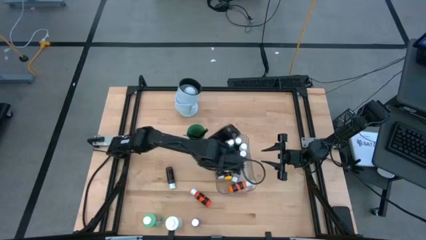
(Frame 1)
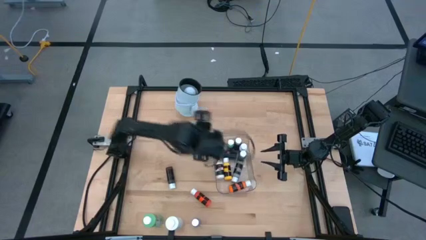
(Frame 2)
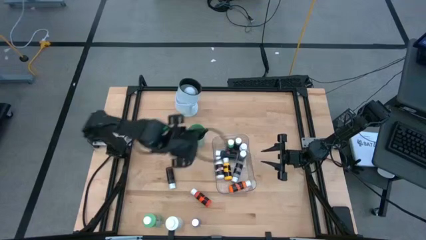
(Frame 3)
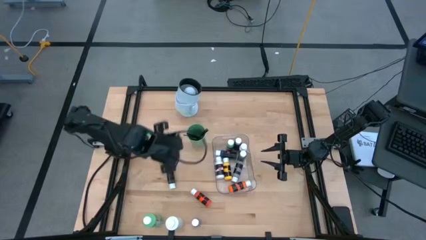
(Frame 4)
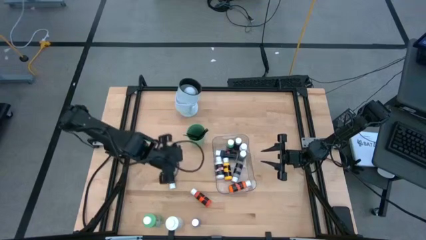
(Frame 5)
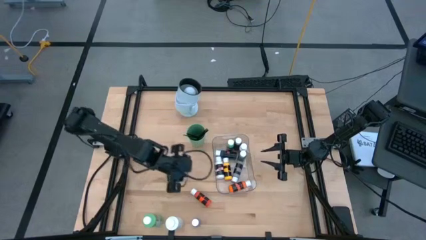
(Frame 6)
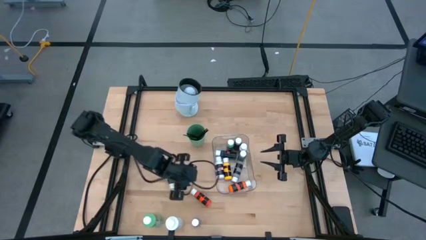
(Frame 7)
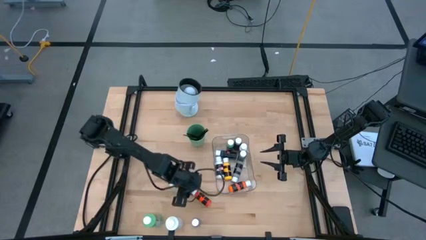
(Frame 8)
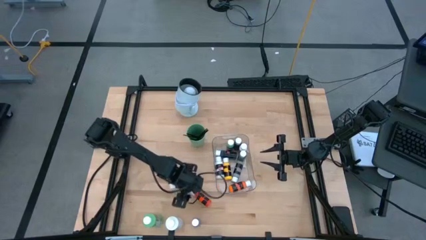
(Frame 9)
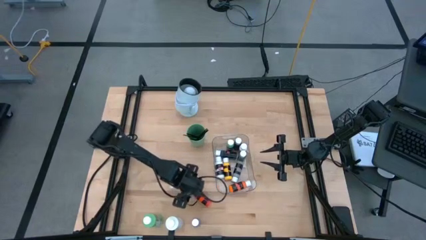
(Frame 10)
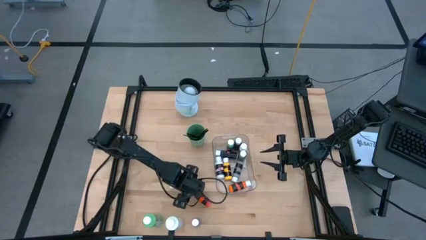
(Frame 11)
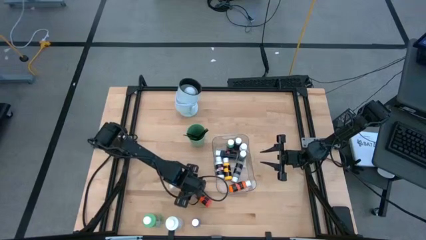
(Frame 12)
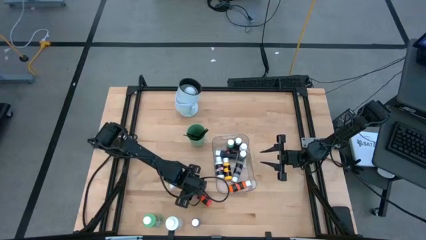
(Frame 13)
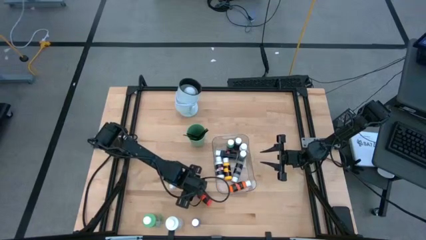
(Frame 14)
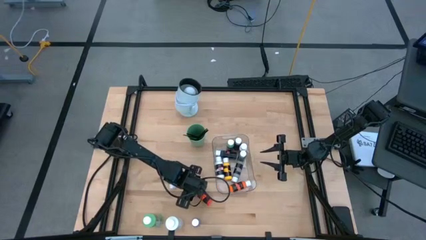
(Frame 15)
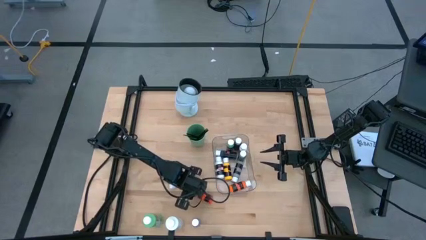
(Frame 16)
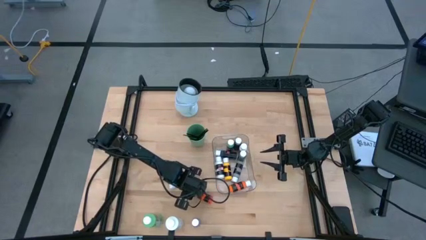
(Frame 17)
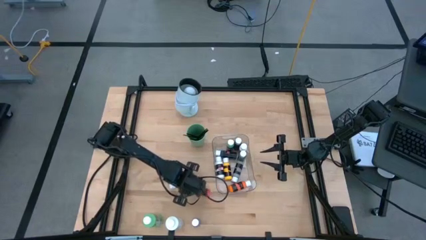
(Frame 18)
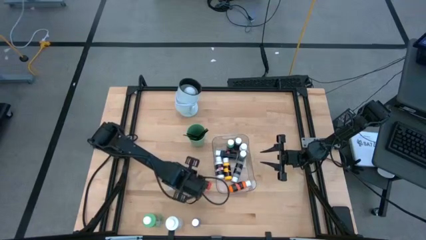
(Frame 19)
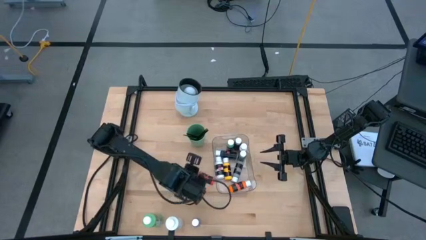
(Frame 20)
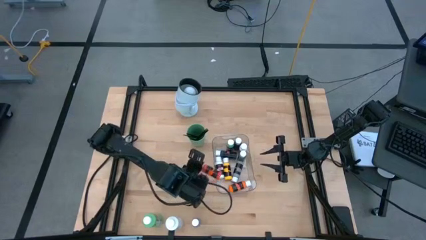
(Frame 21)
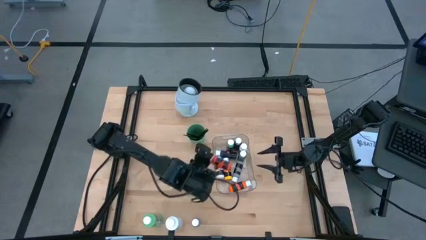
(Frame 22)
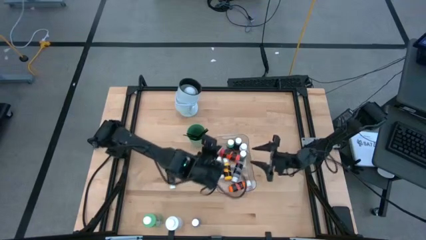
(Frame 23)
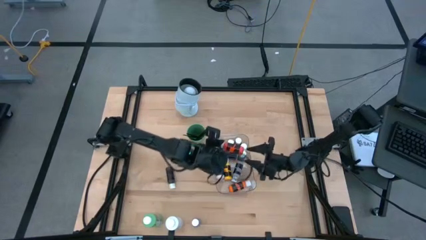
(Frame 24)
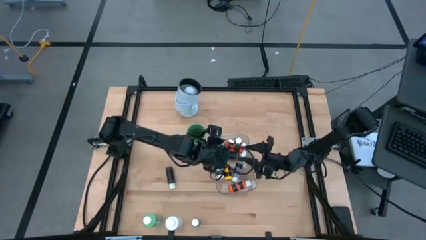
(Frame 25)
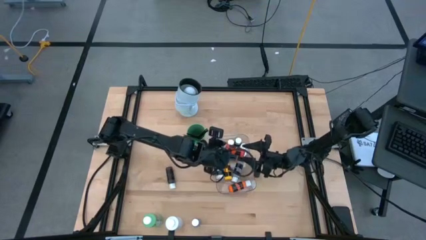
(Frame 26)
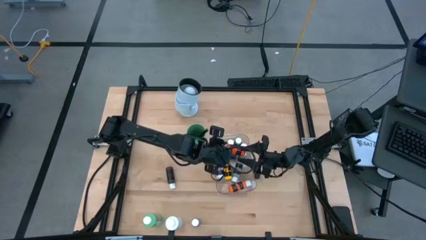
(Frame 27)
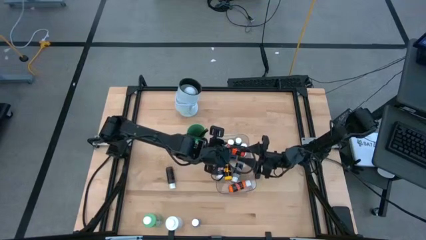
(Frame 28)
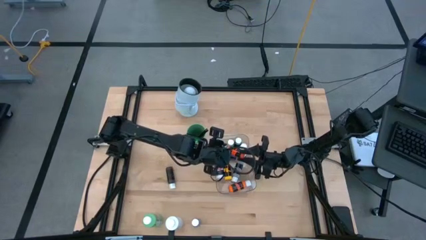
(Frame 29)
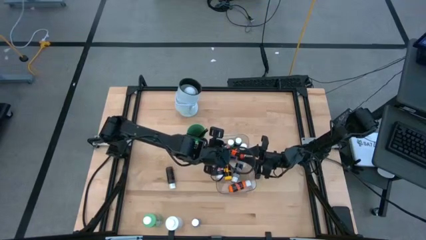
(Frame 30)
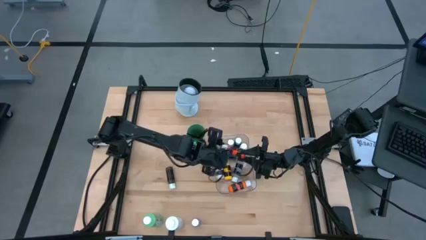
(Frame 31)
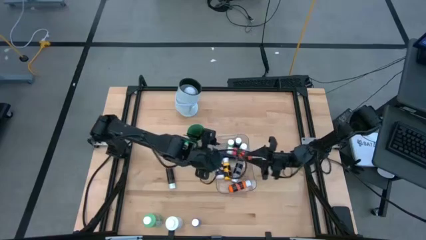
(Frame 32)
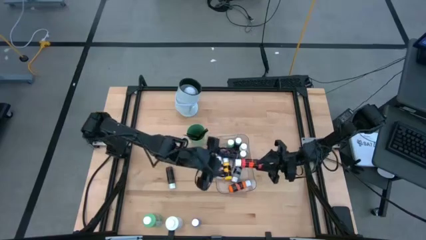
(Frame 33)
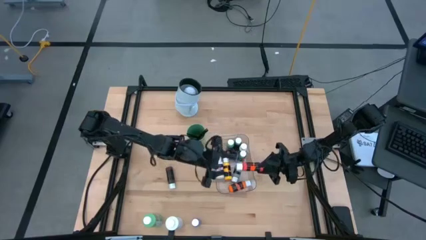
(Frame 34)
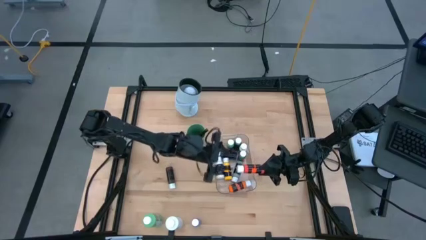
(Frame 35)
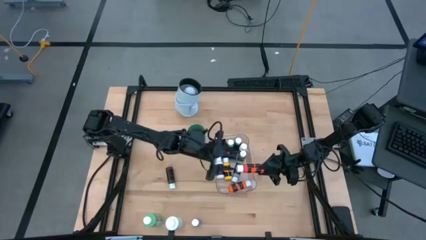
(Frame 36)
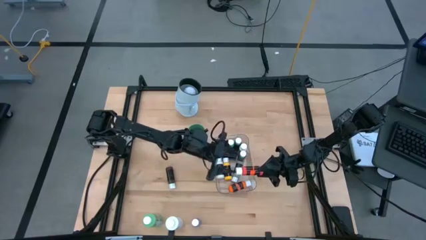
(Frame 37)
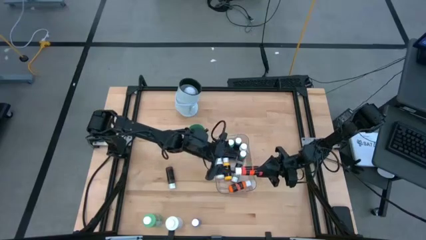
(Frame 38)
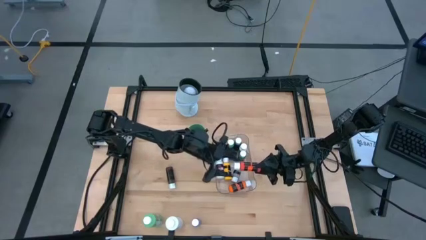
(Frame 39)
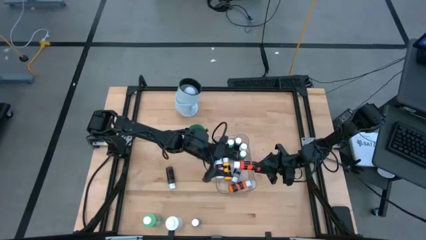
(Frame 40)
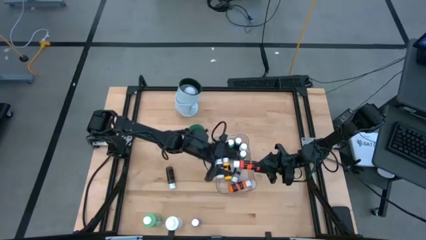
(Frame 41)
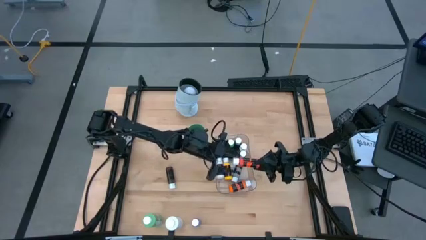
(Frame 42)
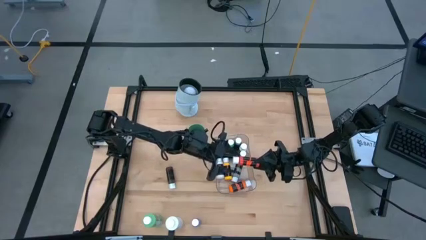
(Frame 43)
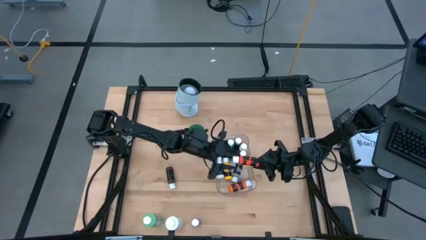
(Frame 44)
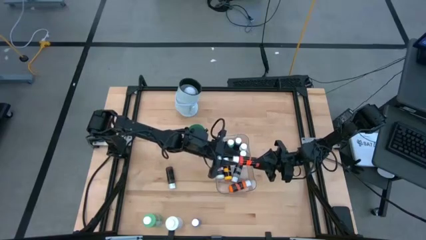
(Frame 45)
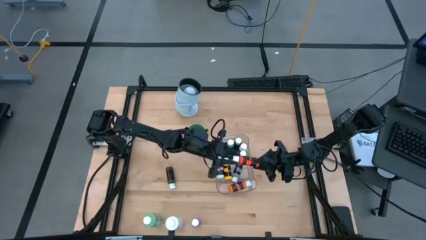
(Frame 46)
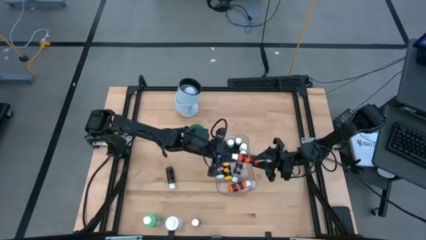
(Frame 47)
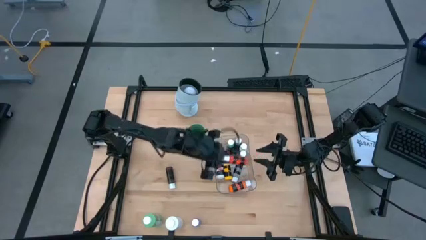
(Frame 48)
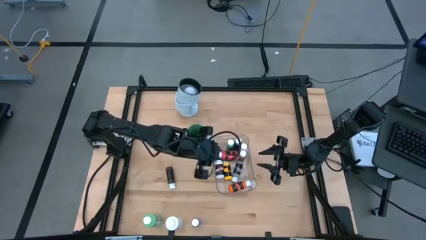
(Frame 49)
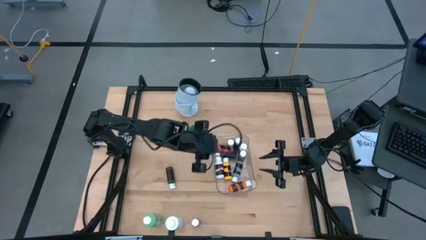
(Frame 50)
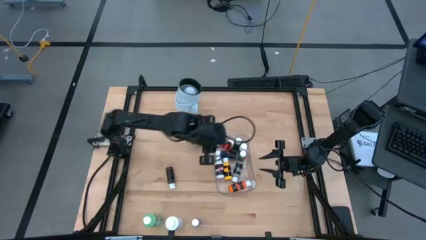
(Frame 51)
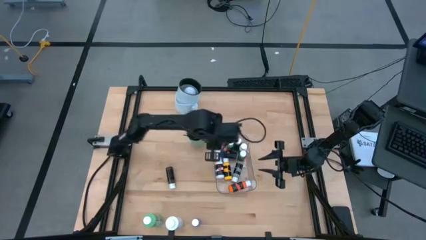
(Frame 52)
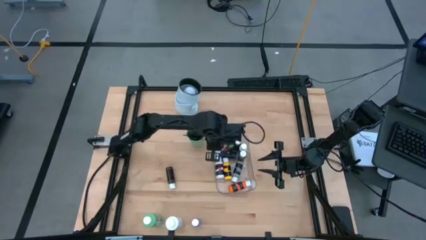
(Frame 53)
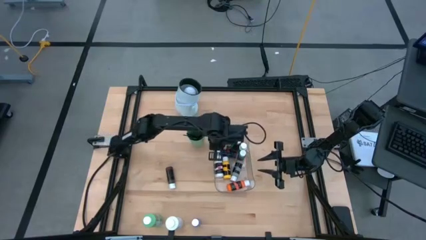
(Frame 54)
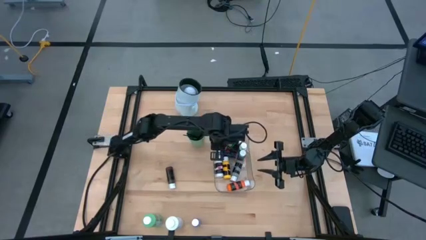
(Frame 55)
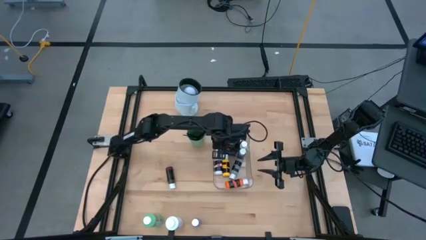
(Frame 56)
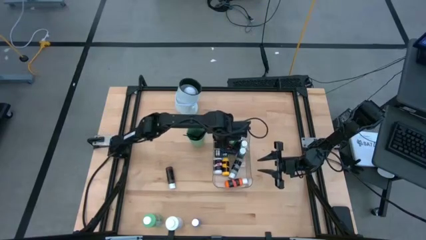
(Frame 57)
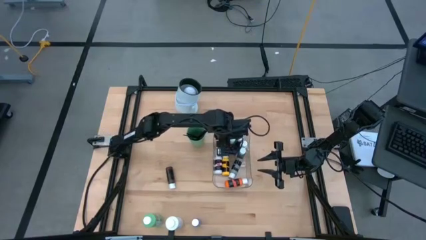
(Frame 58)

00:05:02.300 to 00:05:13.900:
Task: Pick & Place Paint Supplies
Put the small orange paint bottle into the transparent bin

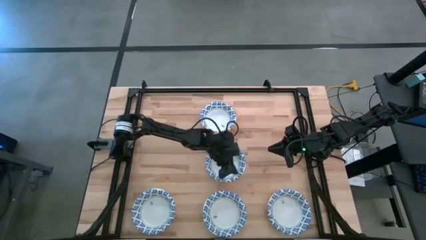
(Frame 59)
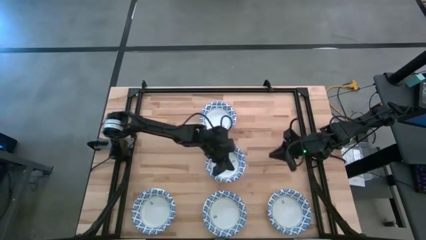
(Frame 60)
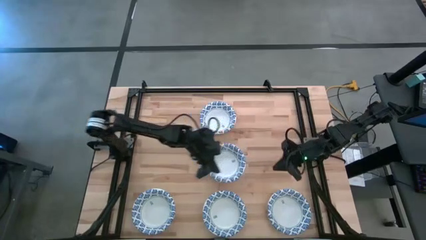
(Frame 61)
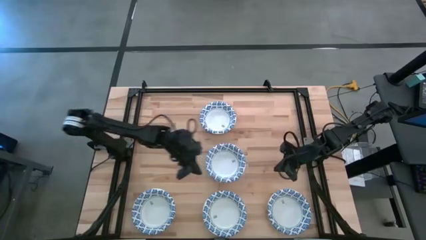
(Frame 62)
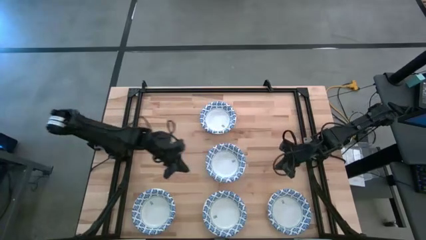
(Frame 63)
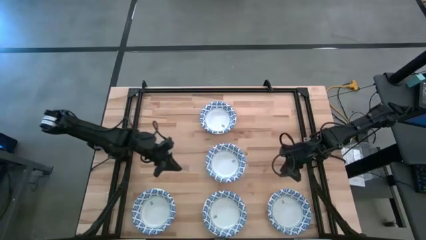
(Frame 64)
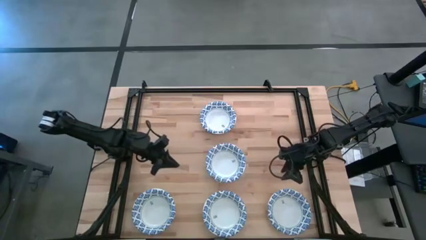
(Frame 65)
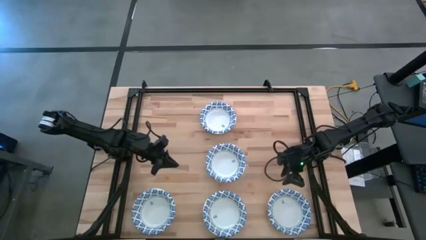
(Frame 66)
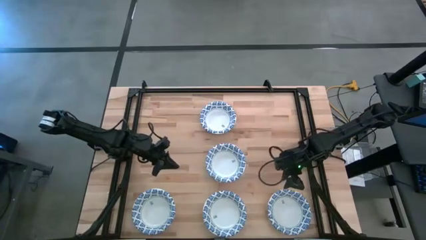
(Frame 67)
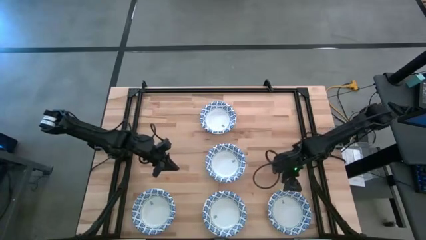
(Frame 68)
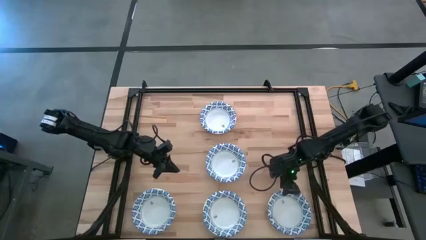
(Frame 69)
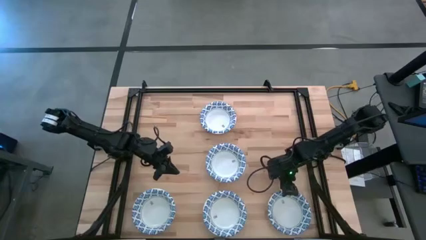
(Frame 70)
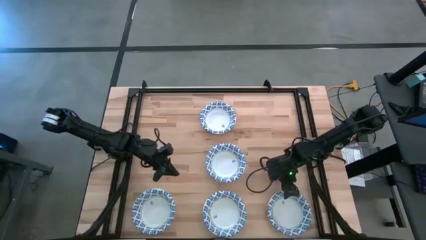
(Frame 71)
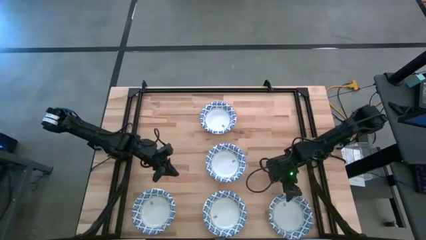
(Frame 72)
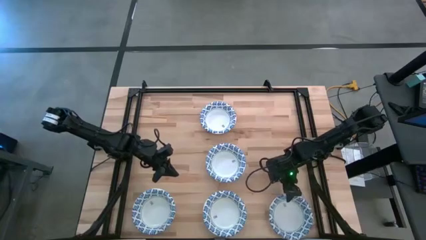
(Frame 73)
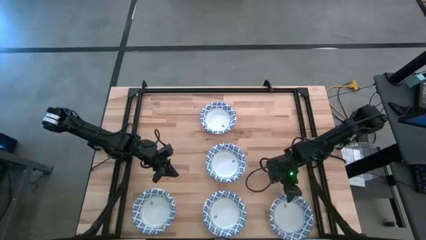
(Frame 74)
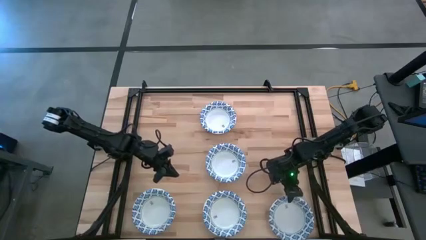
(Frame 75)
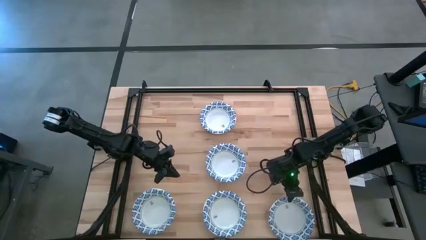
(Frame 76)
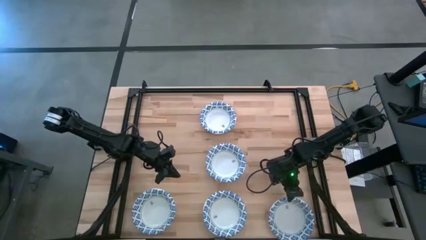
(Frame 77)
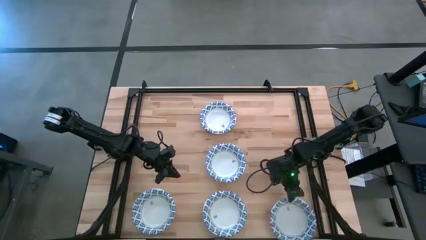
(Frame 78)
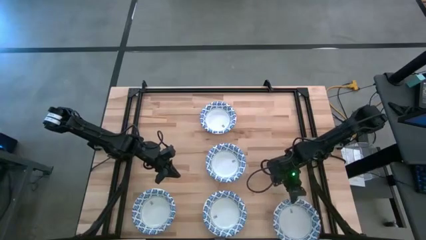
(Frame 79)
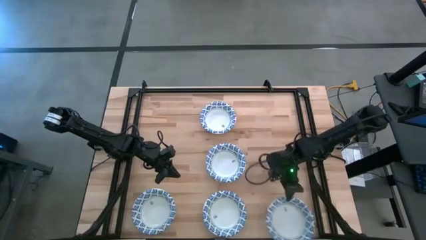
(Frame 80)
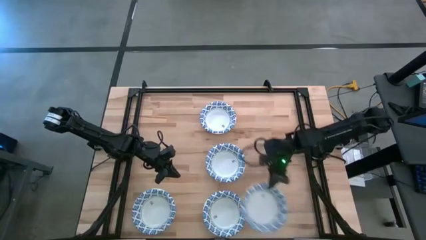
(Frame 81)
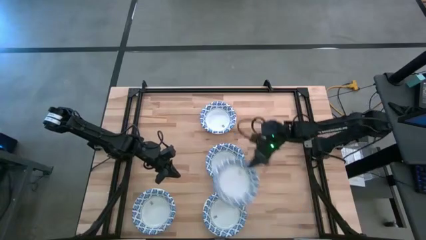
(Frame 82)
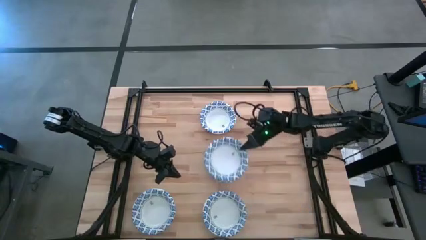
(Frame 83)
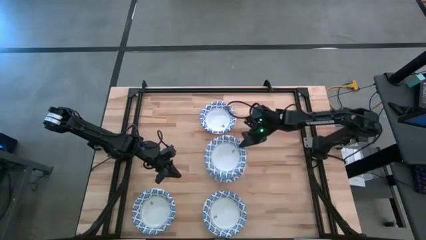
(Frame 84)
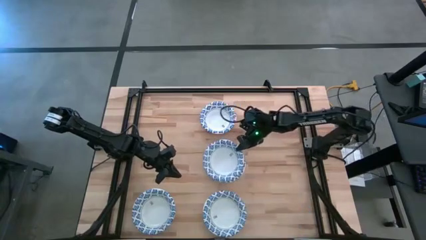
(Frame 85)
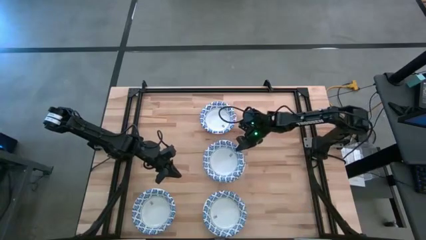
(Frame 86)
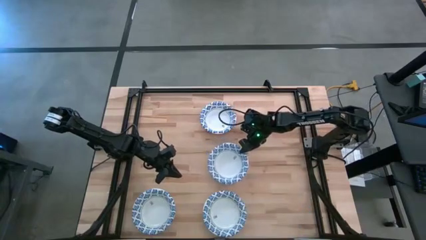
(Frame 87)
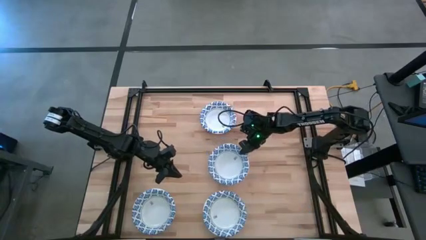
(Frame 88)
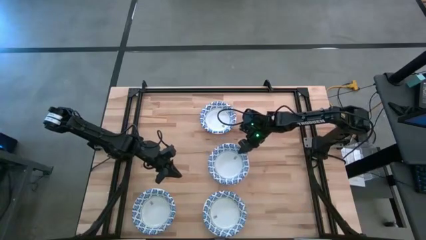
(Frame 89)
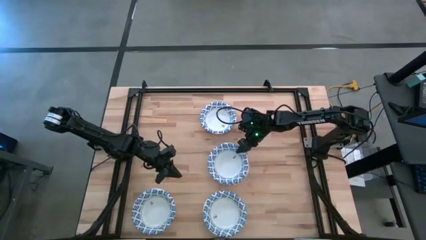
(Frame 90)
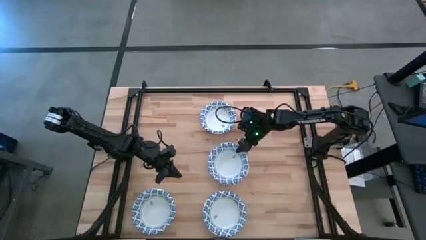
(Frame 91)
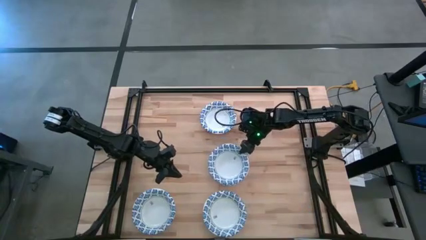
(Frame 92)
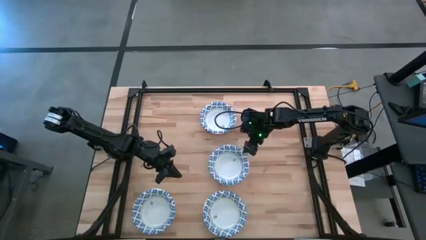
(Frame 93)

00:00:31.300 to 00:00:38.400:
Task: Nest bowls inside each other
Stack the white patterned bowl on top of the other white patterned bowl
